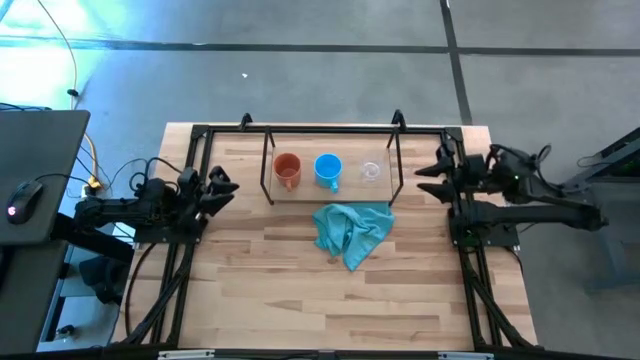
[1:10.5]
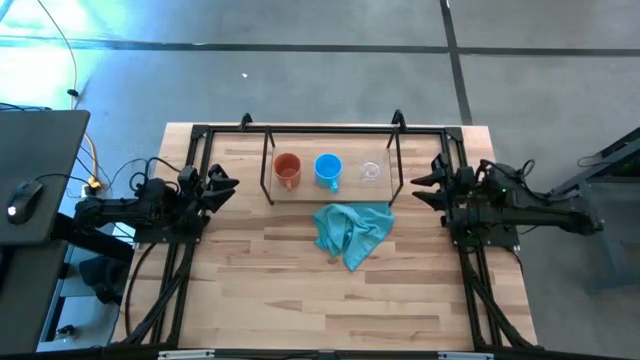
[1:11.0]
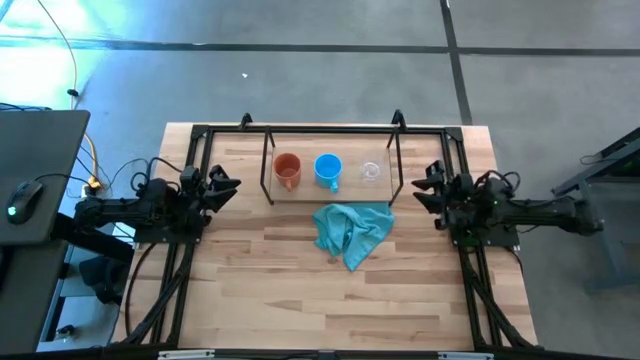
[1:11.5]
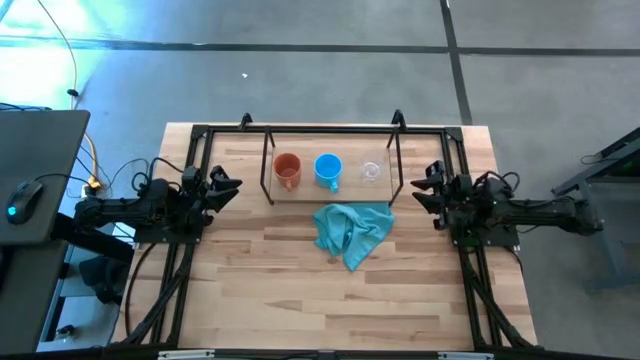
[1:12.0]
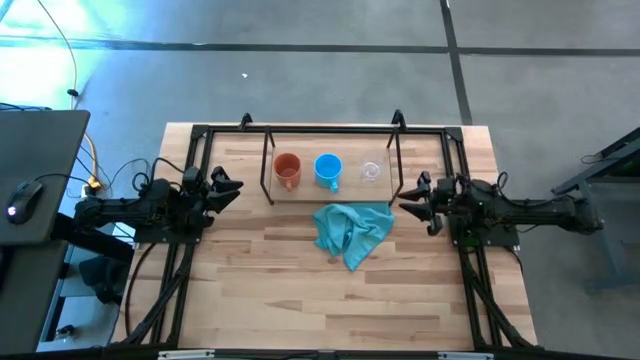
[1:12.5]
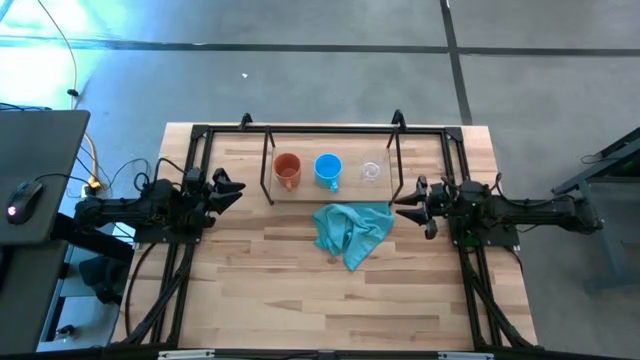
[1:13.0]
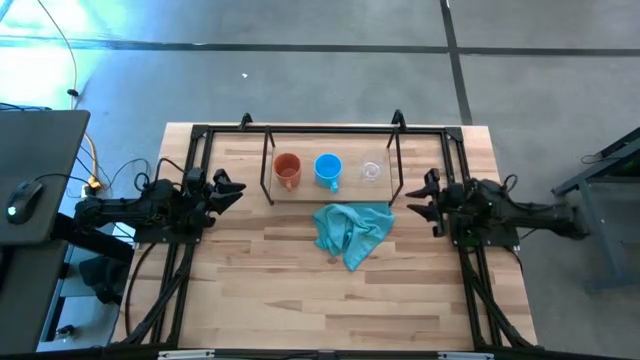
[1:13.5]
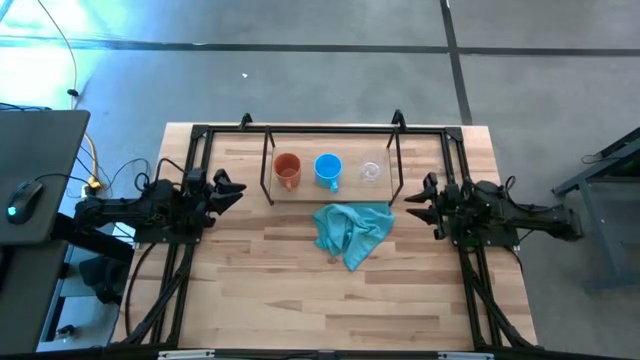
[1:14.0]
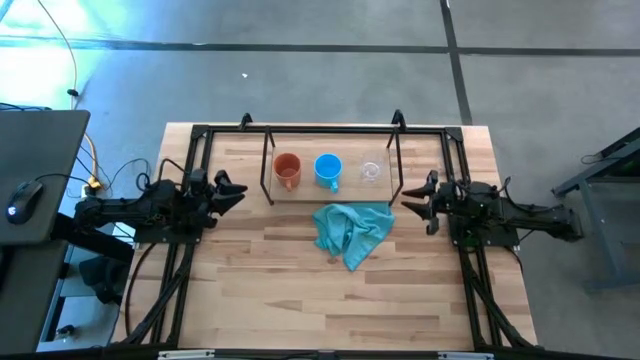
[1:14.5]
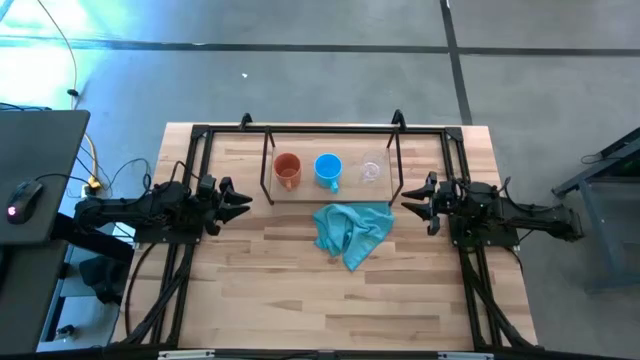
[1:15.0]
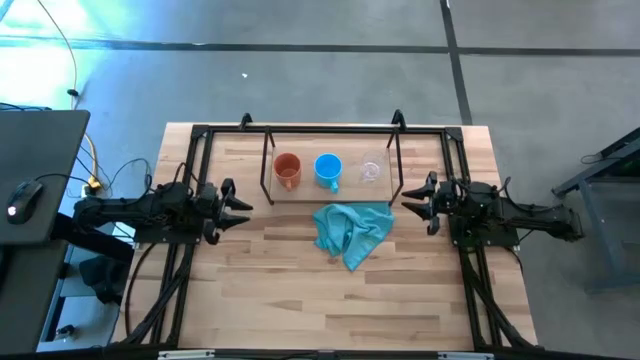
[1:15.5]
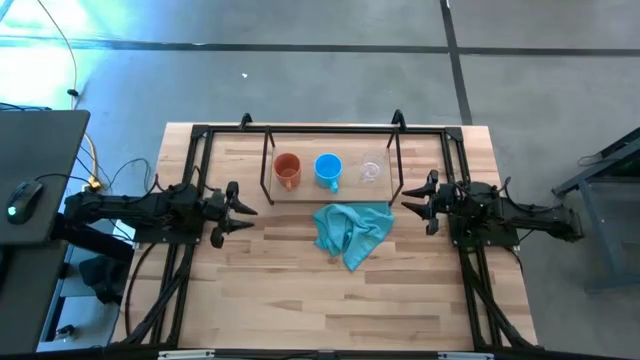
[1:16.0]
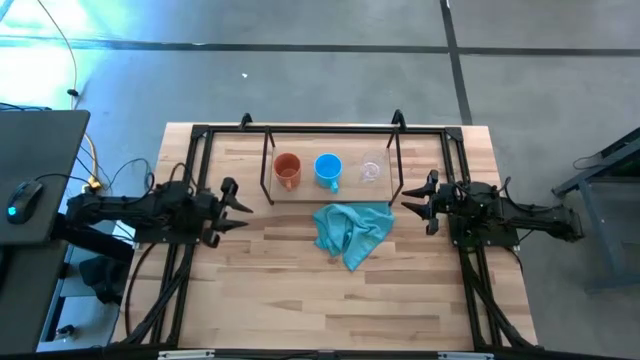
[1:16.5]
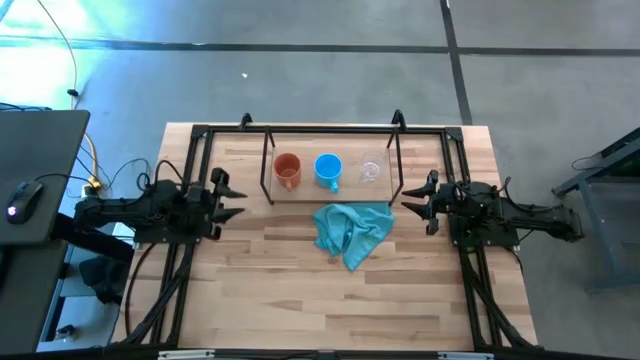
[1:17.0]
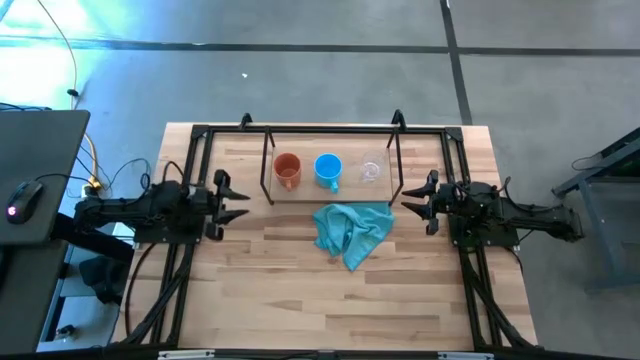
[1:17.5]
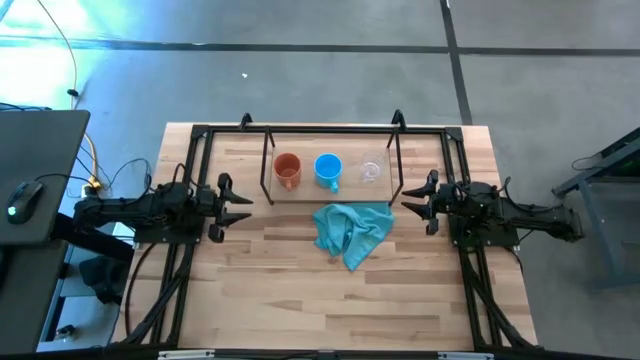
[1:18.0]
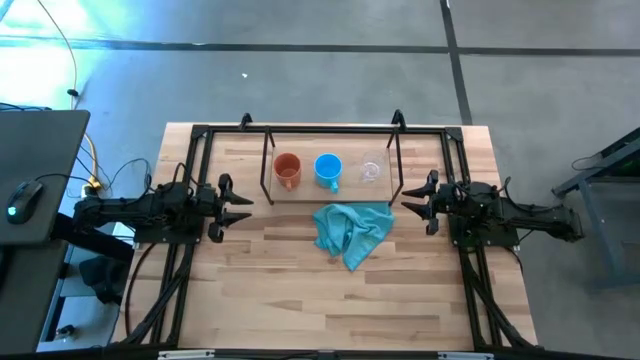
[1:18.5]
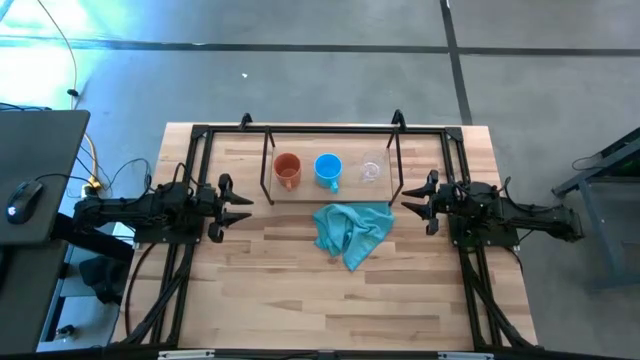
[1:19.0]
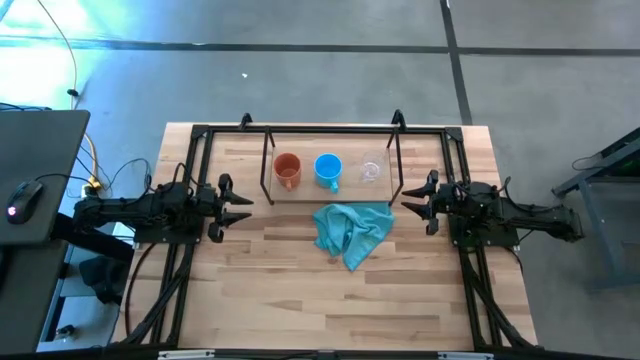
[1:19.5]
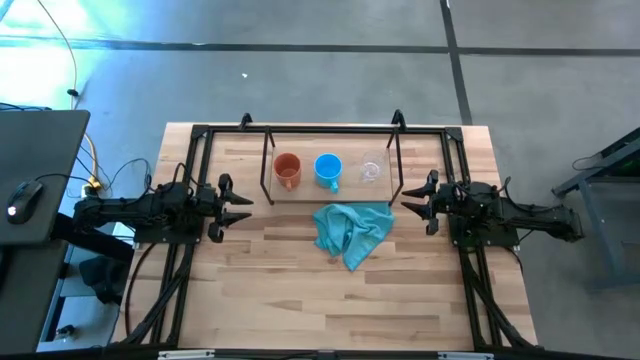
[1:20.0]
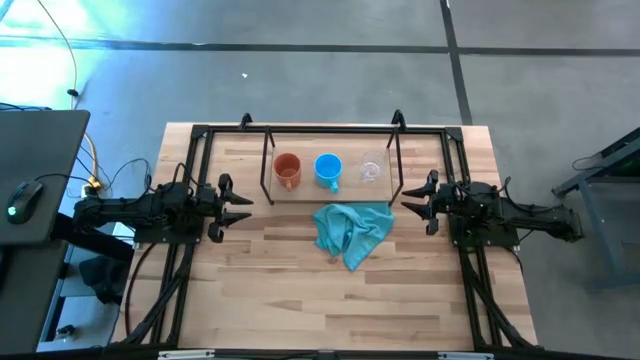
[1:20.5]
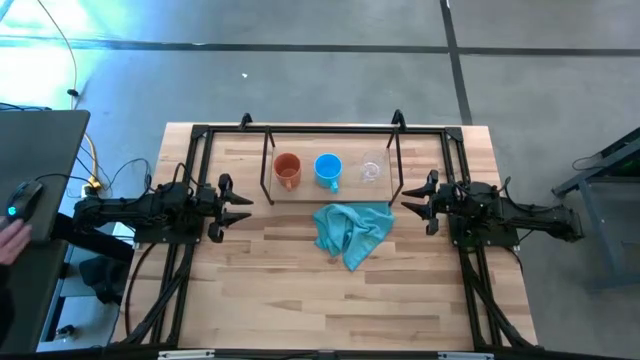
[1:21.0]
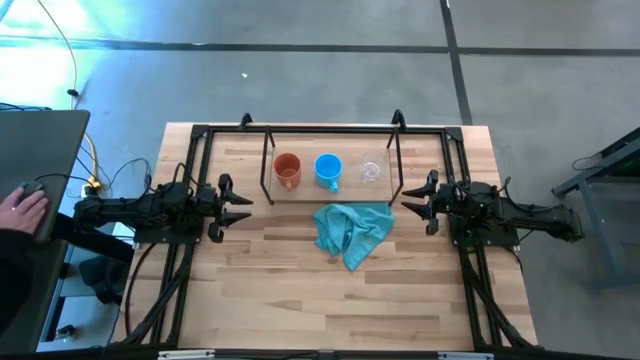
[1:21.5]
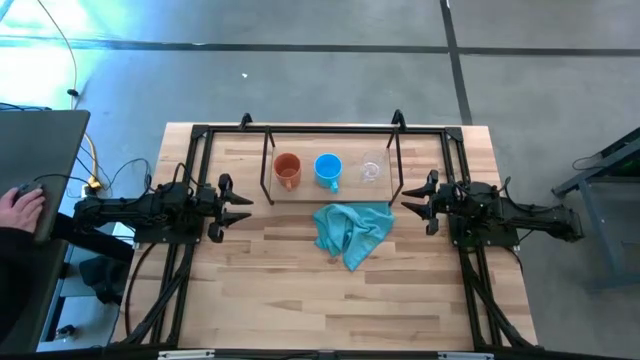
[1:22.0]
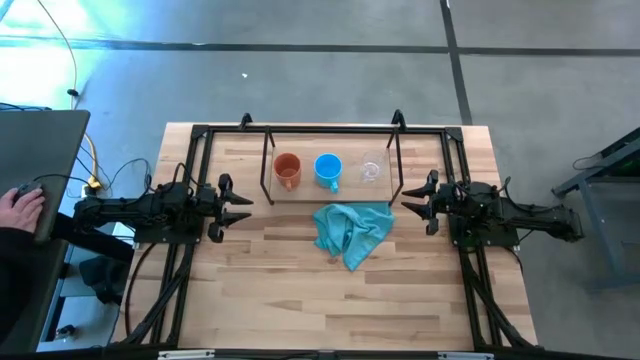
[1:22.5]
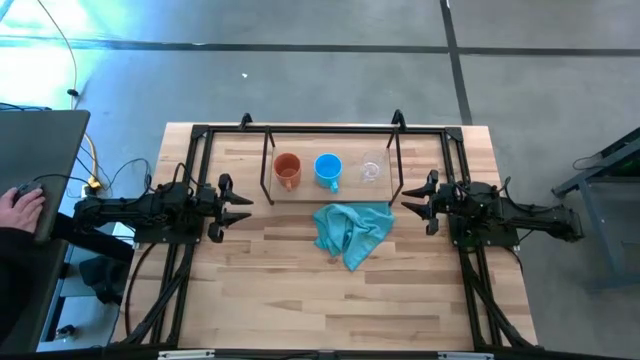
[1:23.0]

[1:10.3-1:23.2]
Task: Stack small to large cups/mugs on shelf
Return to Home Position

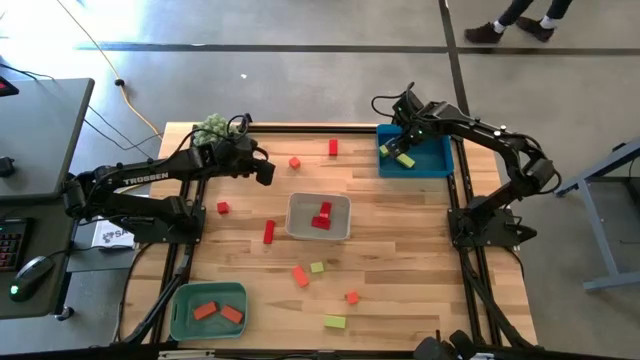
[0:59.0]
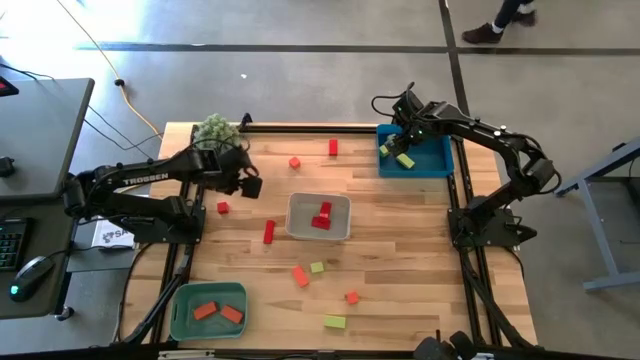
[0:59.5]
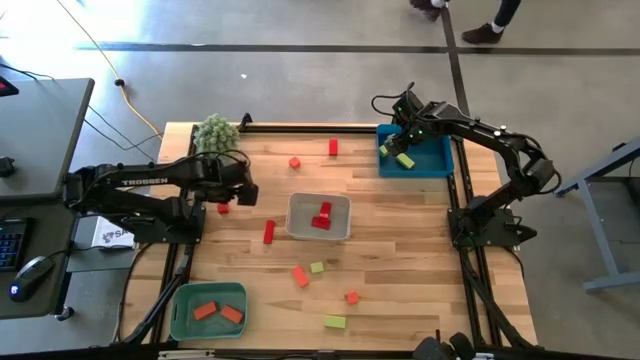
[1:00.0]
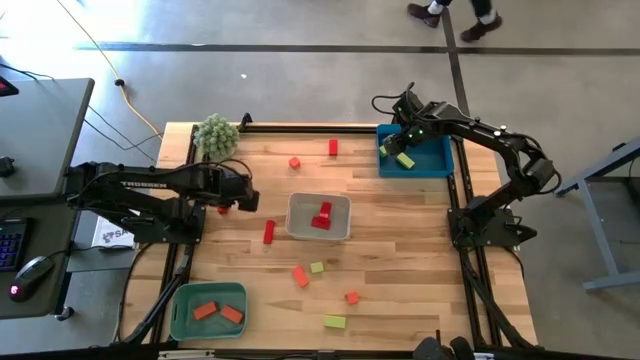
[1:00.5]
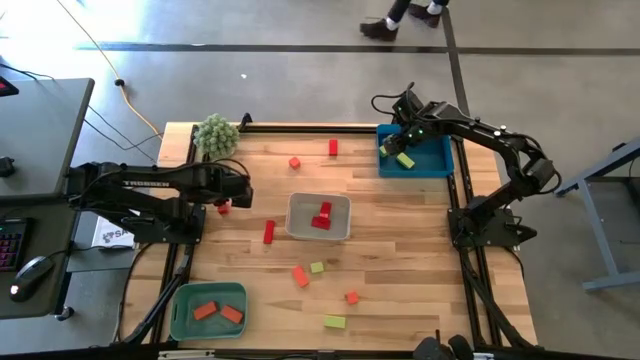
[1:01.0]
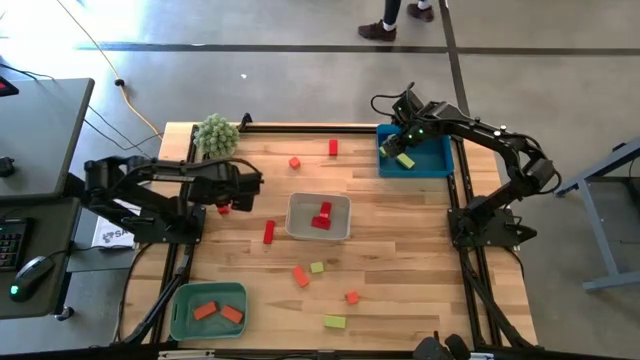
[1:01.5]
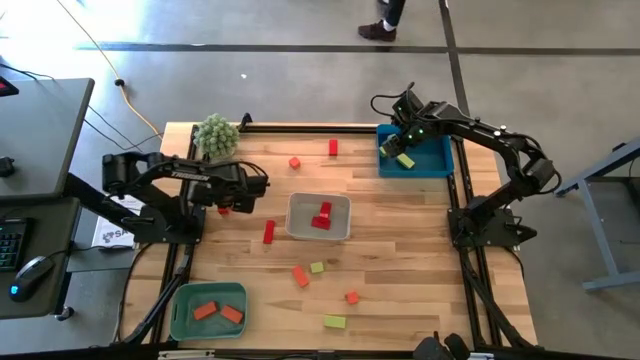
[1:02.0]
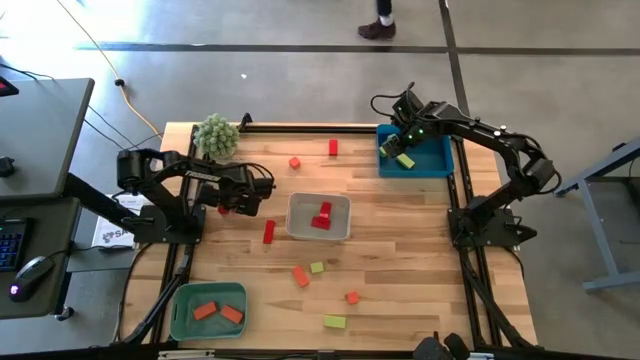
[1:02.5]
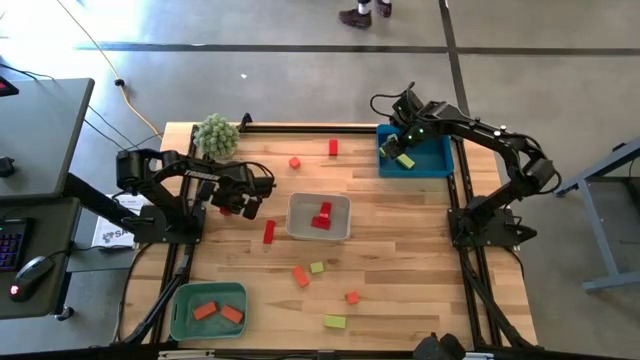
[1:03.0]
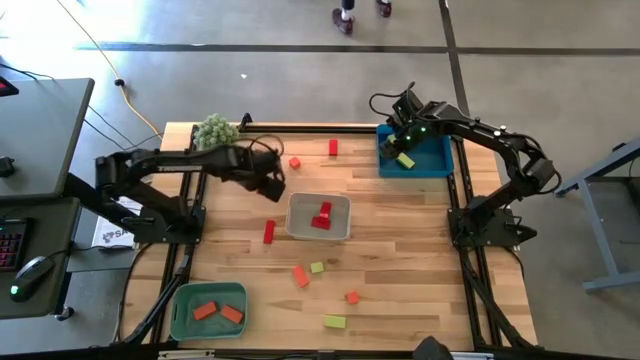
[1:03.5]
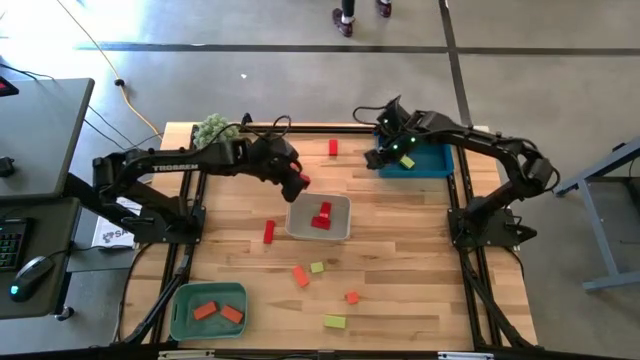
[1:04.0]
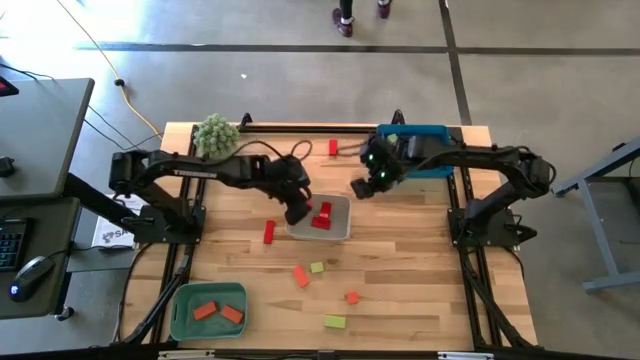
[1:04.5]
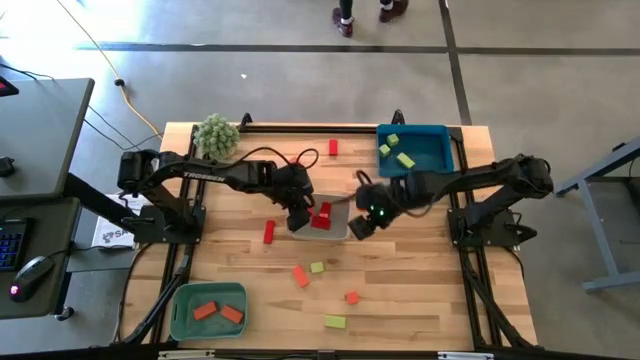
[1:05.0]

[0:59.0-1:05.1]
Task: Sort & place blocks by color
Put the red wooden block into the white bin

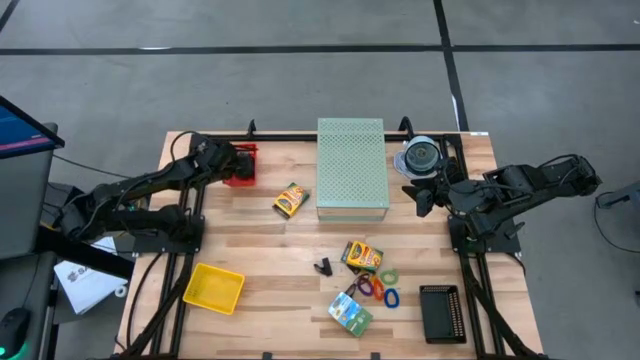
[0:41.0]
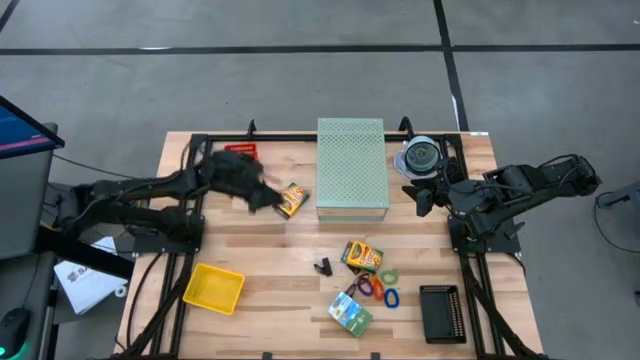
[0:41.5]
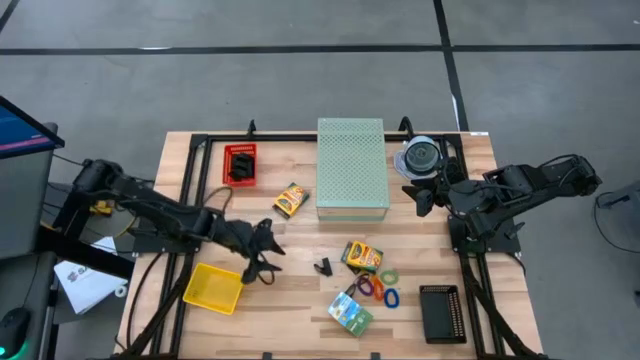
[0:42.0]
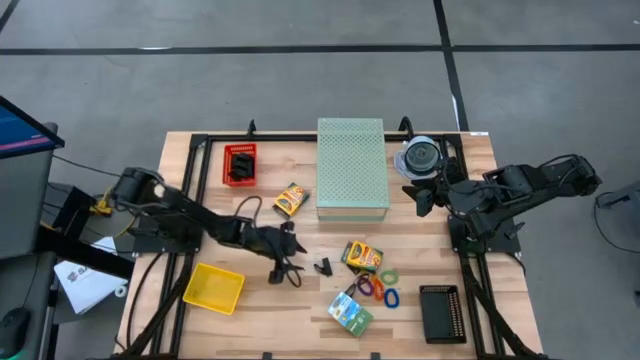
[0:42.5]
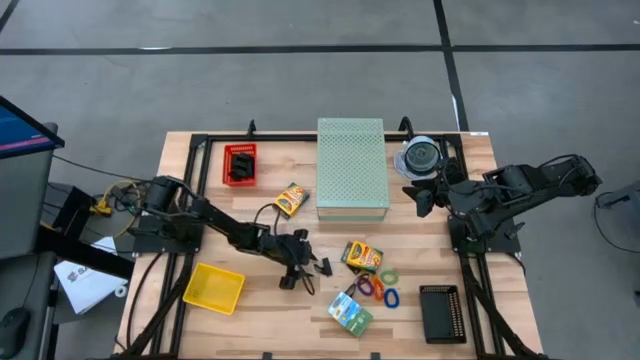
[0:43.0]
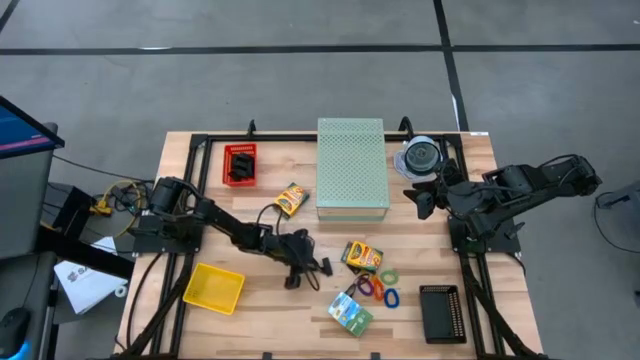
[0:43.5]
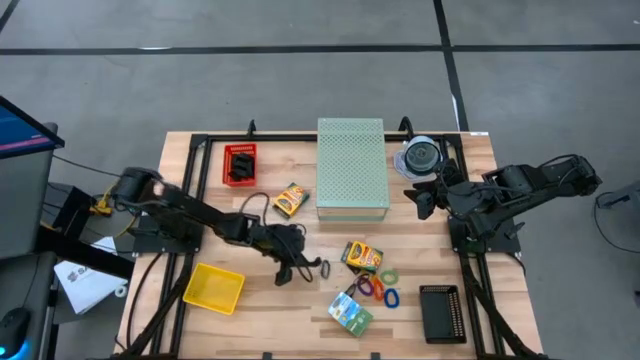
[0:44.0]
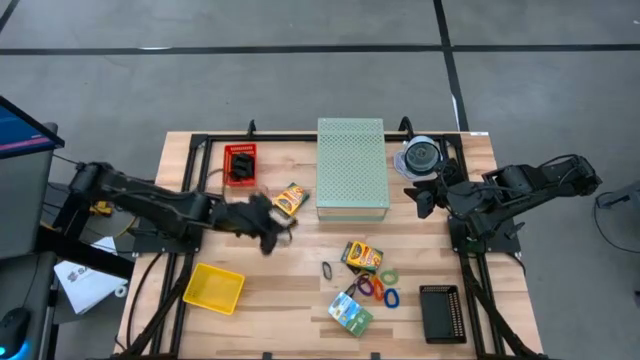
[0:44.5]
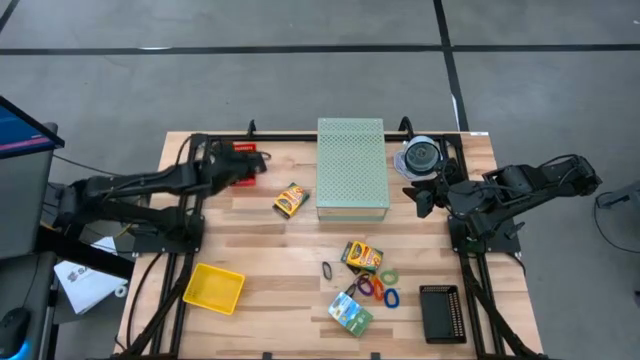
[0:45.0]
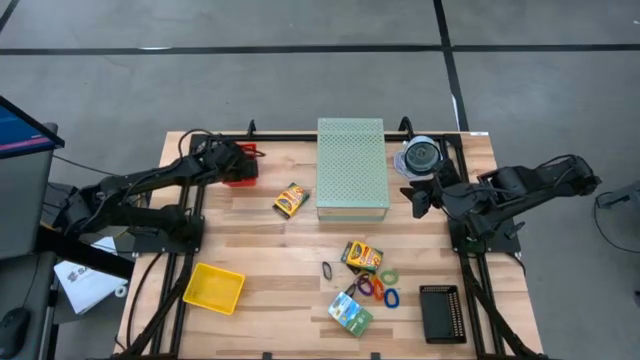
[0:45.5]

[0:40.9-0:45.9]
Task: Pick & Place Office Desk Supplies
Put the black rubber band into the red bin
